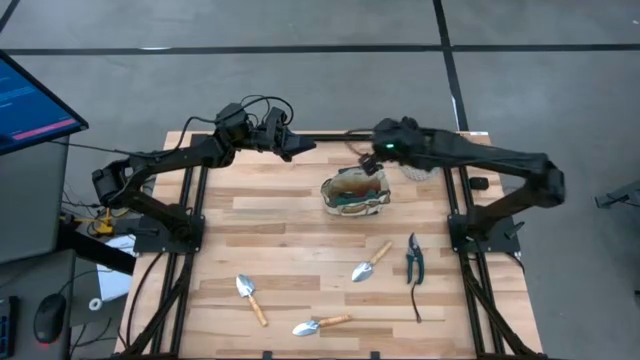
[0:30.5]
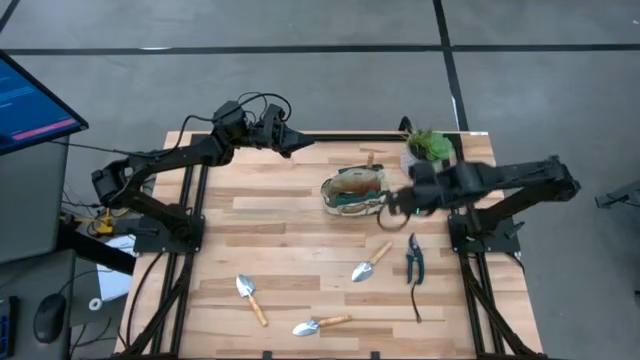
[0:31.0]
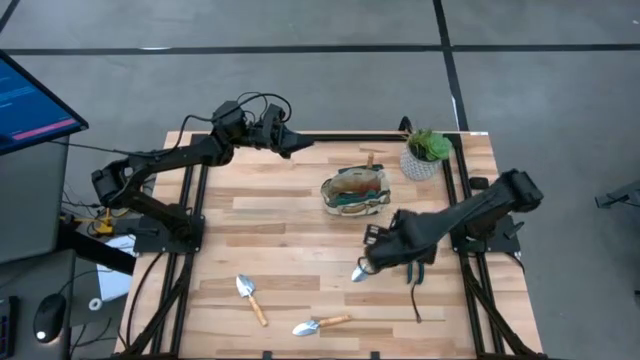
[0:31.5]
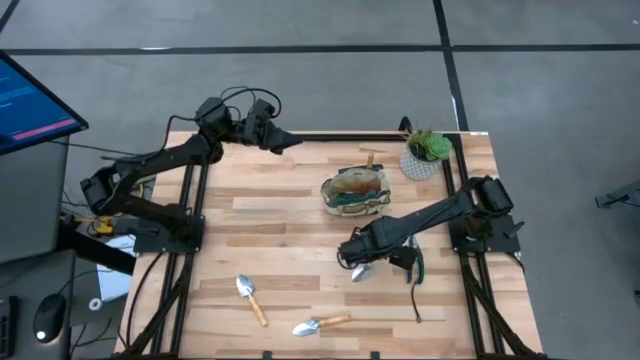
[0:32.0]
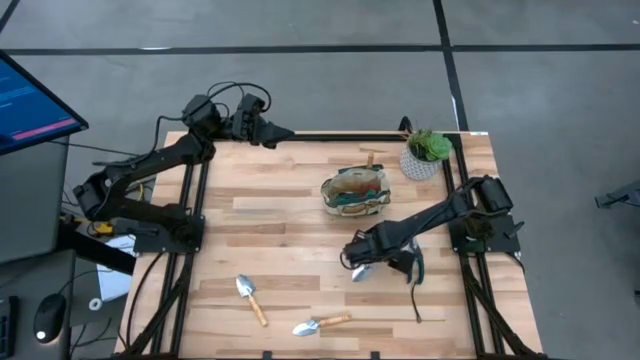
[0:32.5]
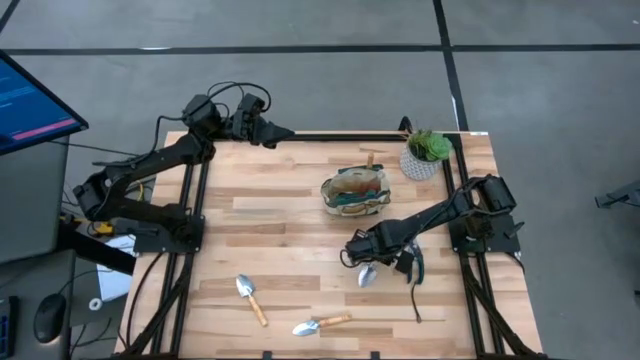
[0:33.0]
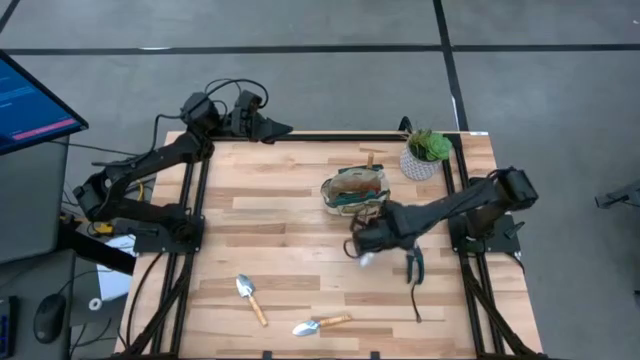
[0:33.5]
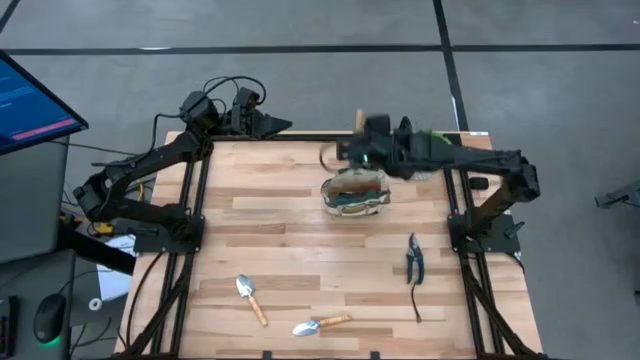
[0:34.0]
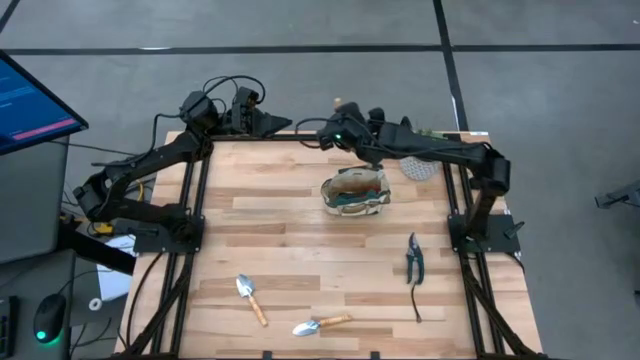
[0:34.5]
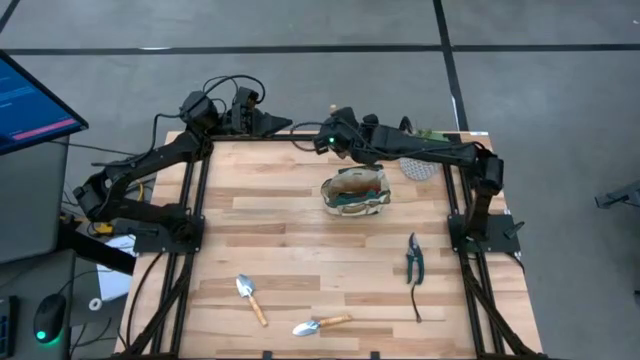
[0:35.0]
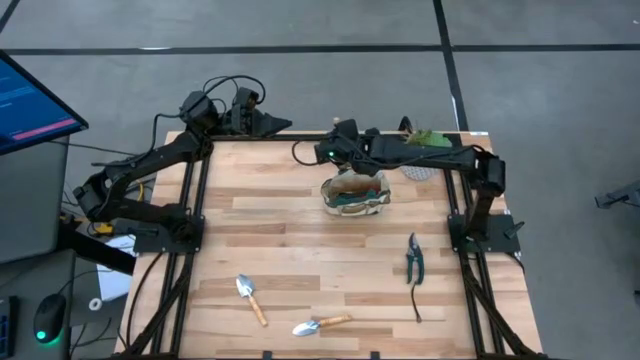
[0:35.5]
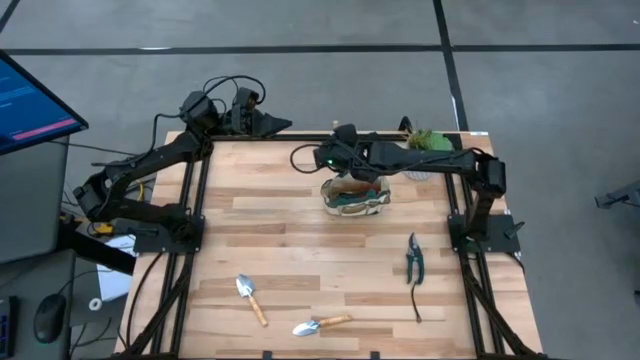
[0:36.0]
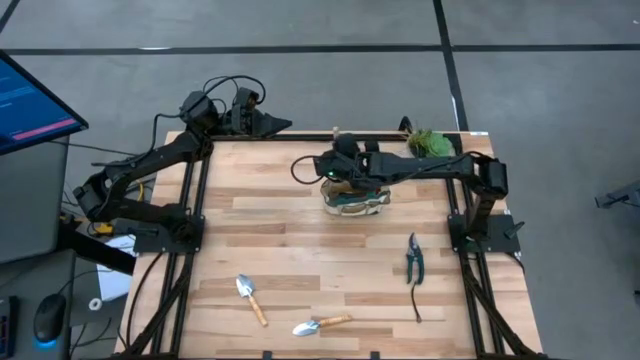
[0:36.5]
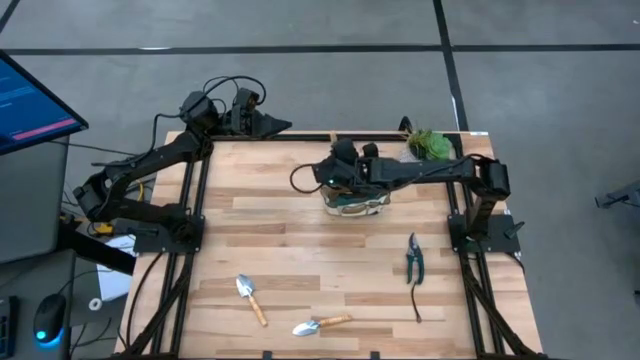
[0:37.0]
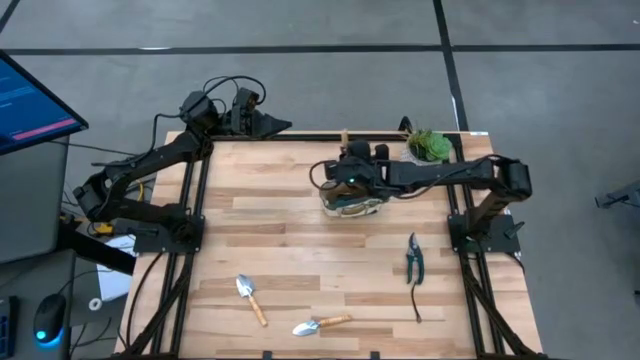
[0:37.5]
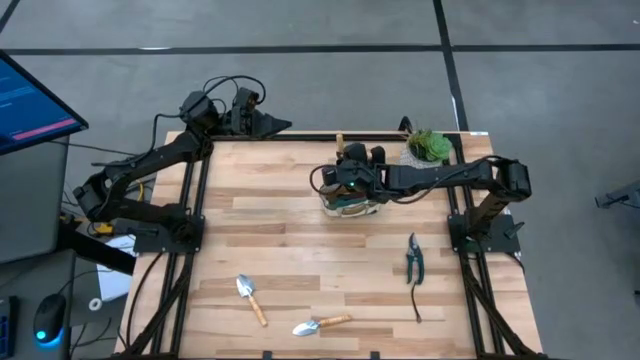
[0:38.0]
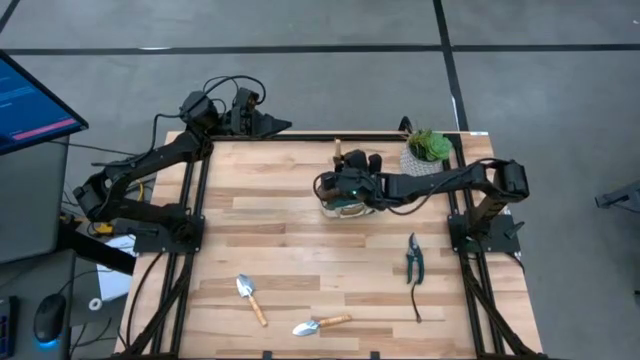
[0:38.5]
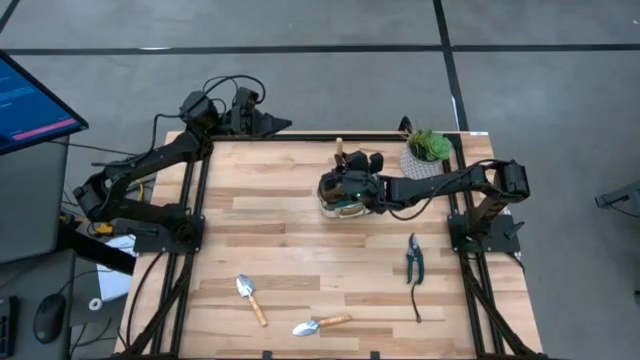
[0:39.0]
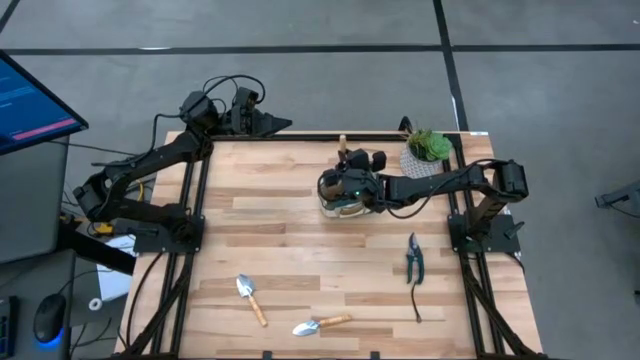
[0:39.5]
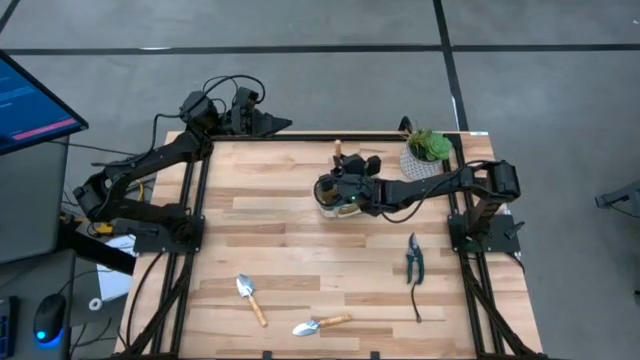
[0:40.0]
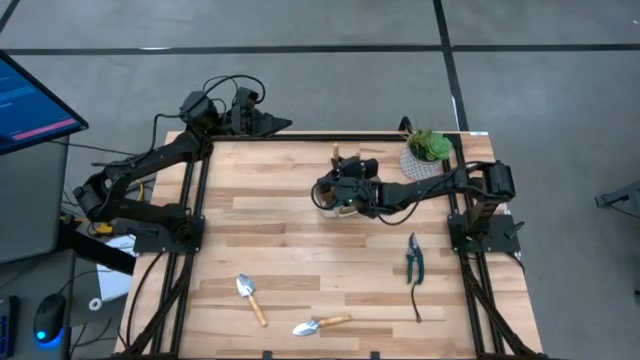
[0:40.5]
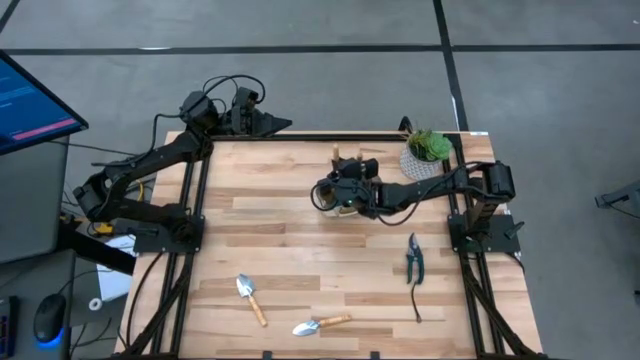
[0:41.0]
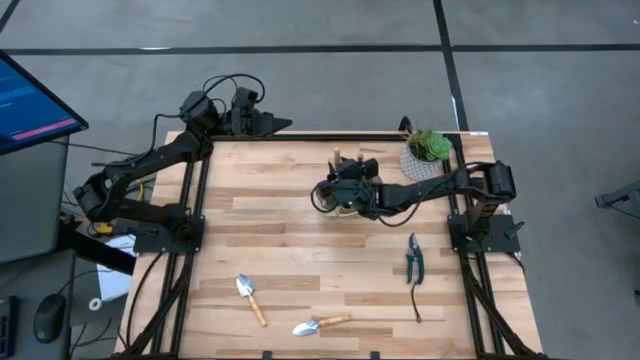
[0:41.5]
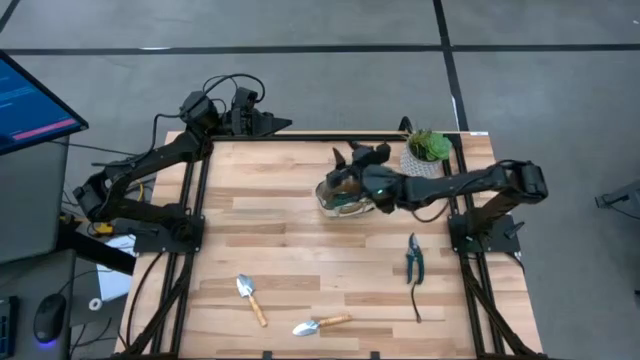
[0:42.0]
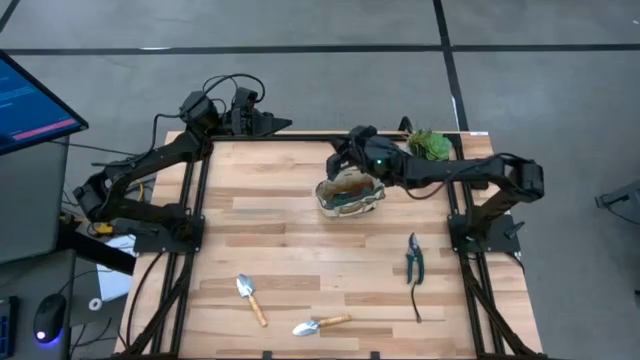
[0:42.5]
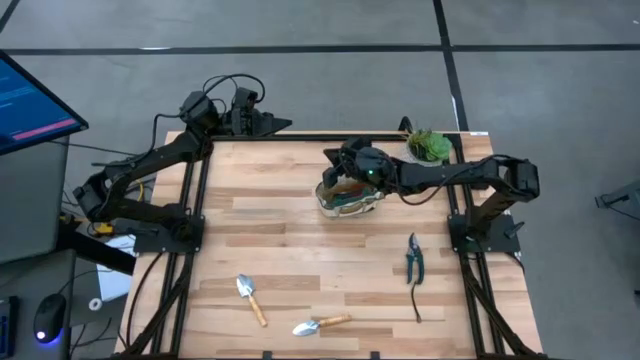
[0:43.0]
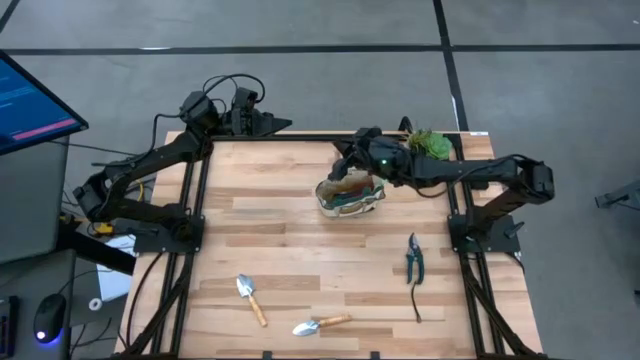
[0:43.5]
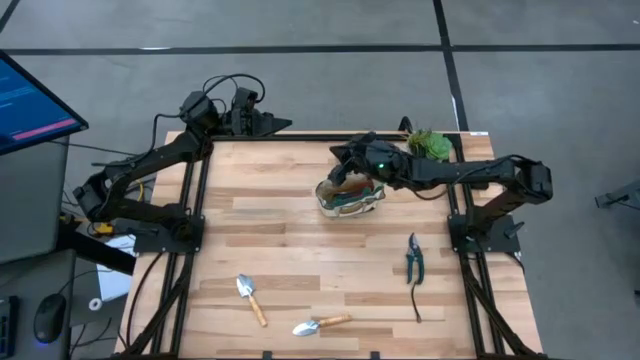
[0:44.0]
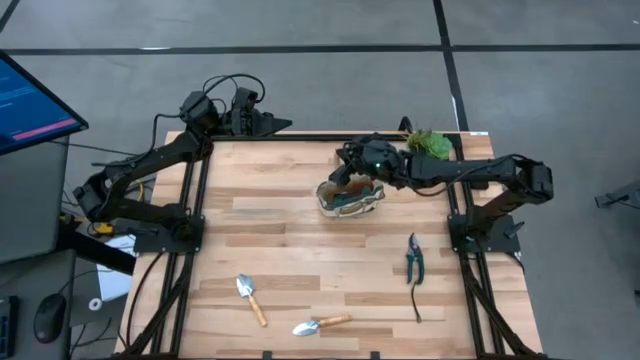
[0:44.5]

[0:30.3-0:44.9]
Task: Pick & Place Garden tools in Gardening bag
Put the trowel into the gardening bag

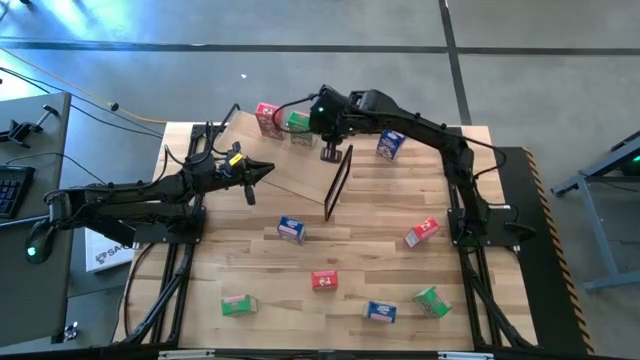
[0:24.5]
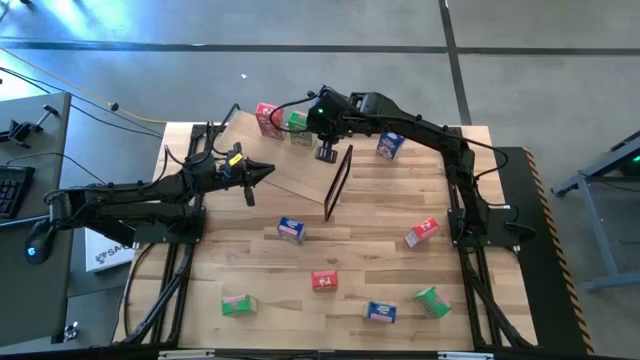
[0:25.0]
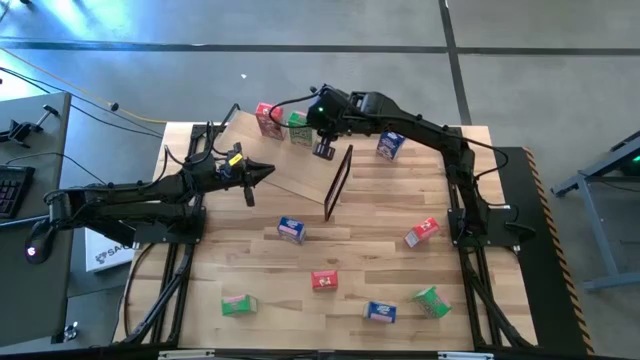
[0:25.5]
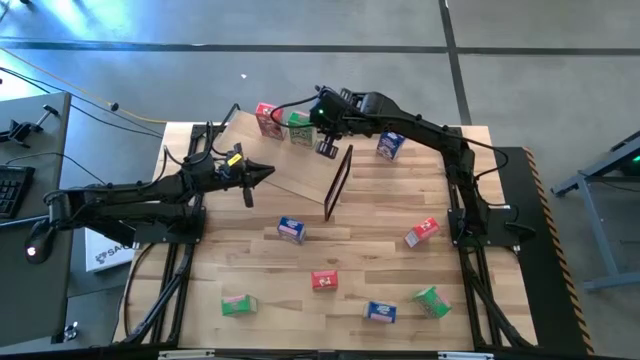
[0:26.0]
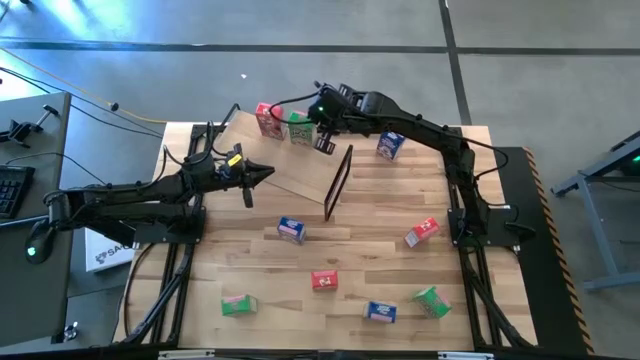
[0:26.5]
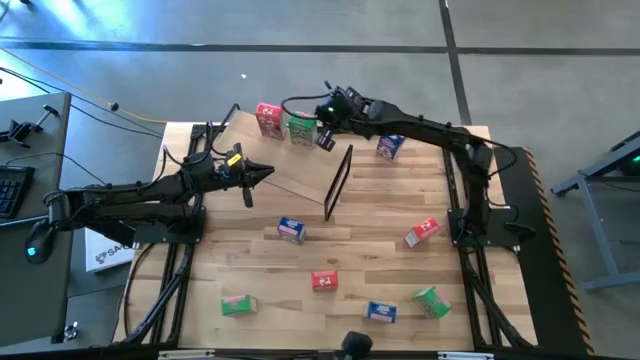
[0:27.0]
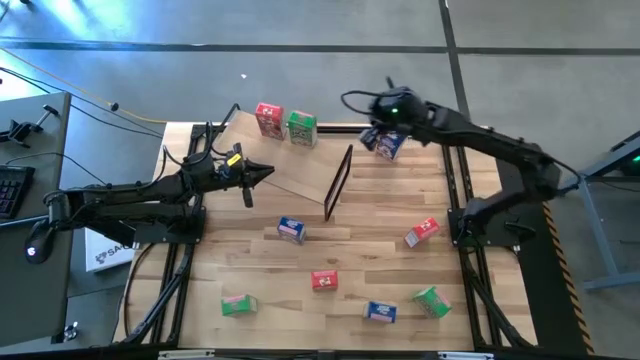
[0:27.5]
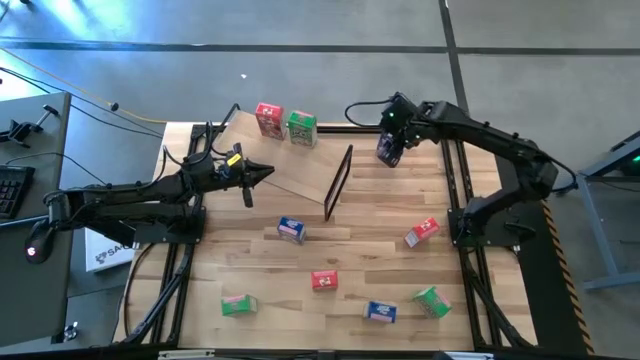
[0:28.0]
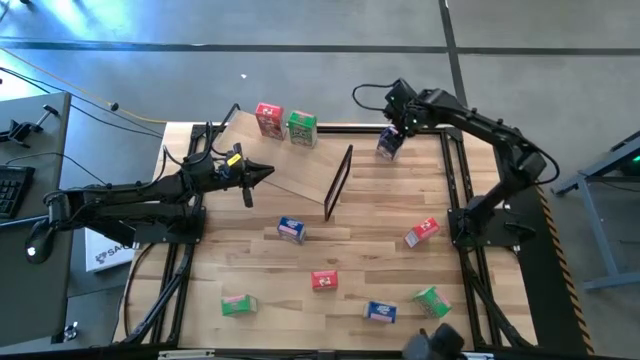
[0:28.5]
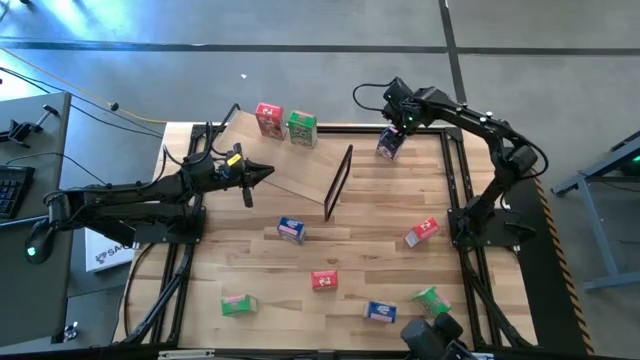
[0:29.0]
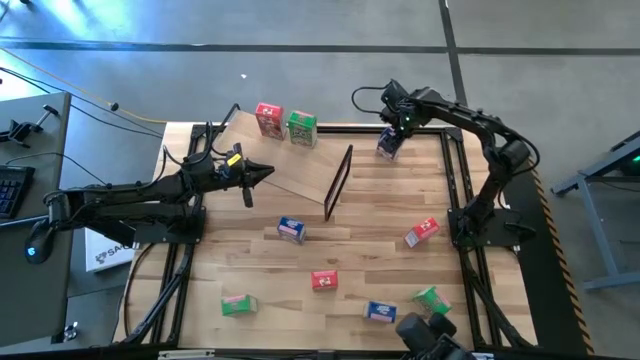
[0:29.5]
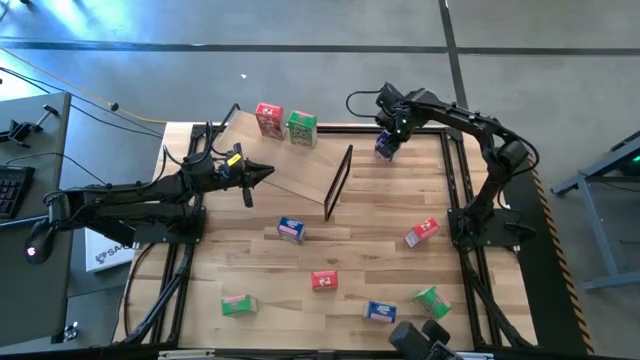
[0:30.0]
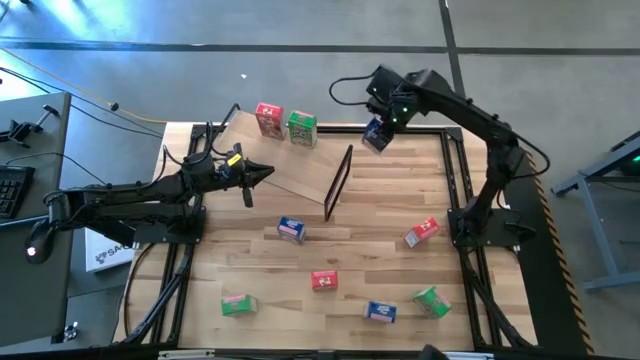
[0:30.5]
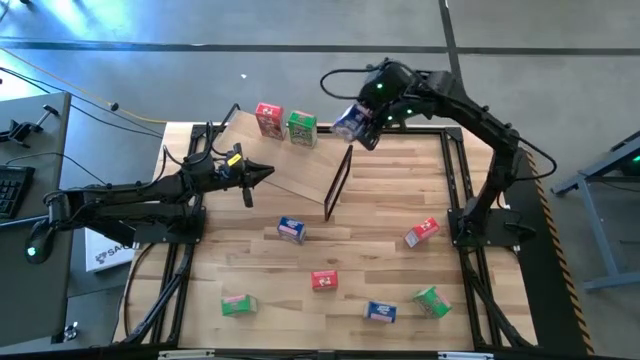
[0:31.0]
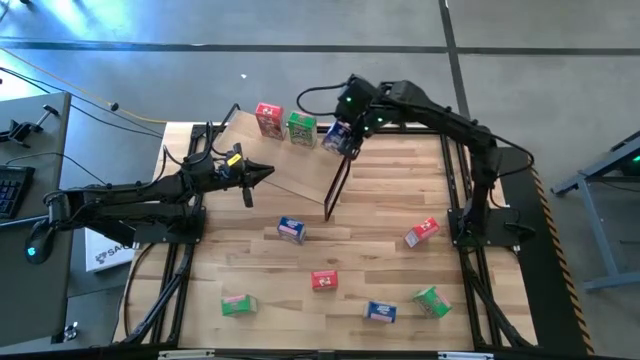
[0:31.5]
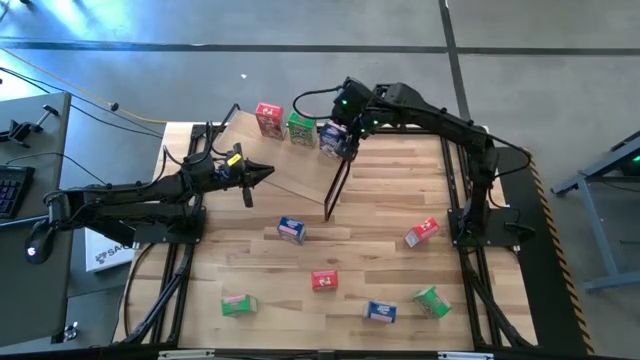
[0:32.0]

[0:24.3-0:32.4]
Task: Stack cereal on shelf
Put the top blue cereal box on the shelf
